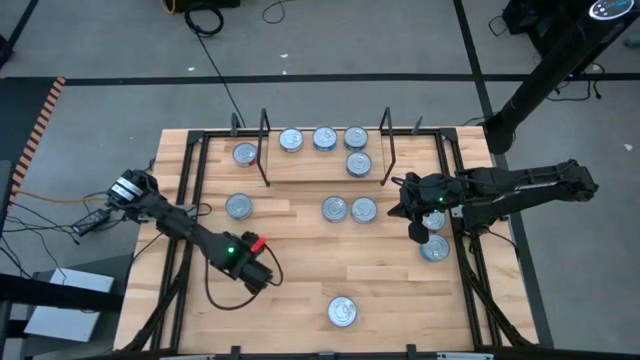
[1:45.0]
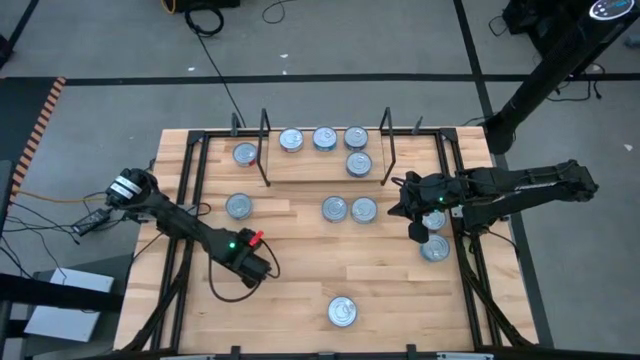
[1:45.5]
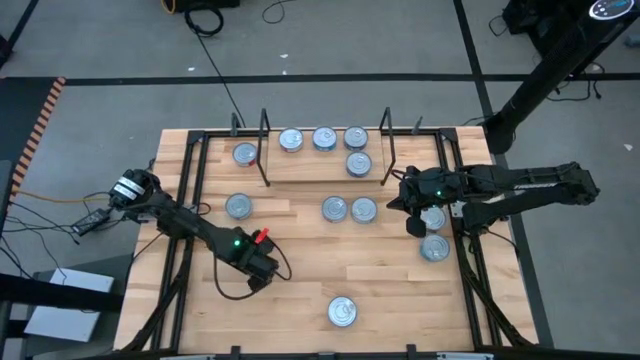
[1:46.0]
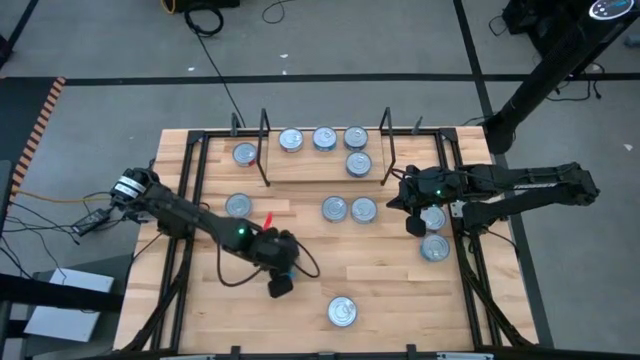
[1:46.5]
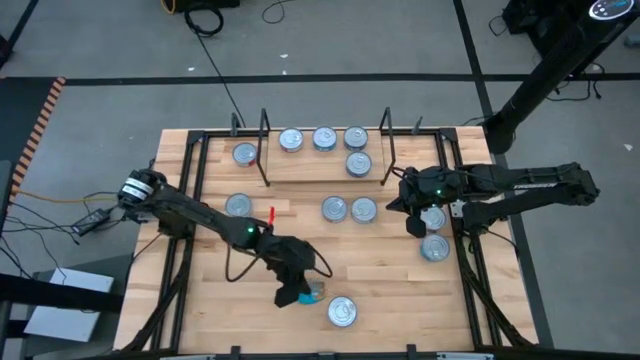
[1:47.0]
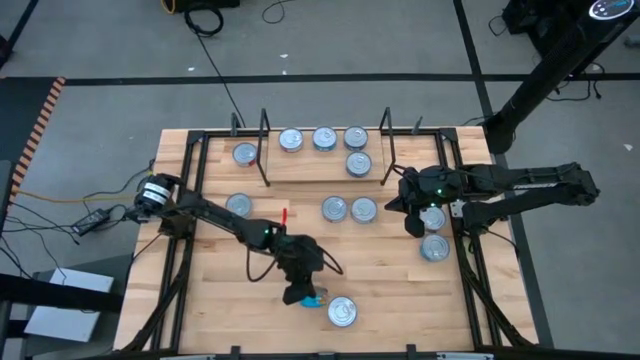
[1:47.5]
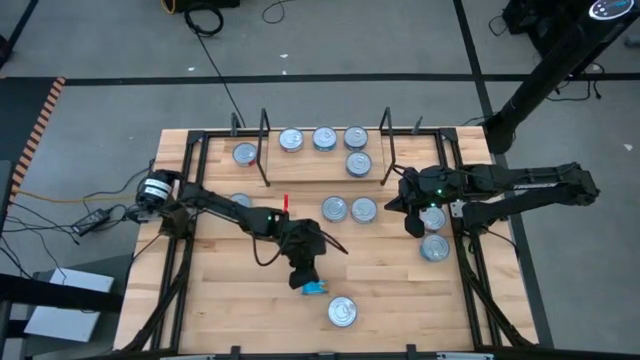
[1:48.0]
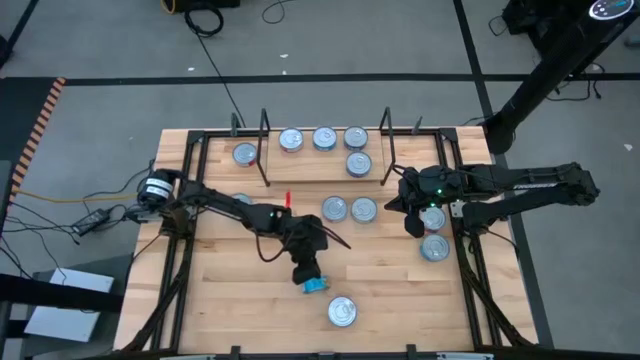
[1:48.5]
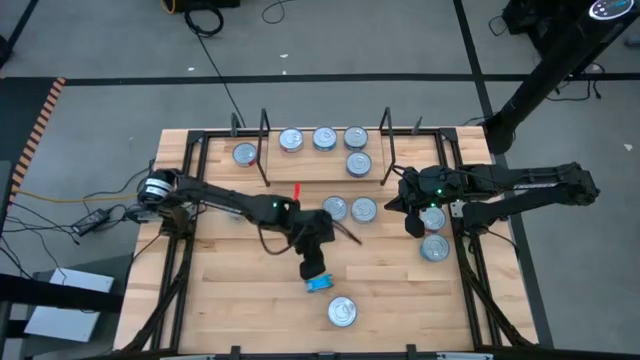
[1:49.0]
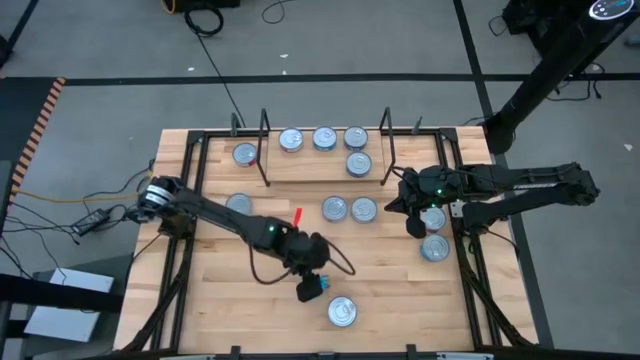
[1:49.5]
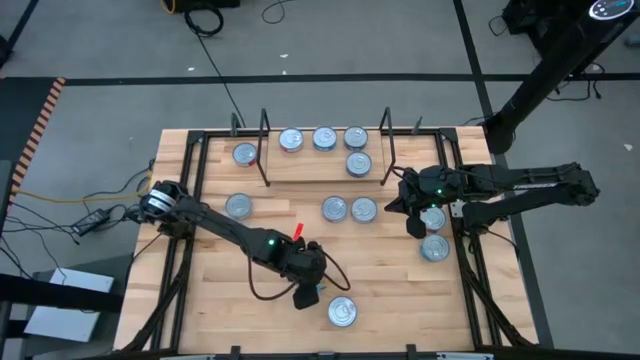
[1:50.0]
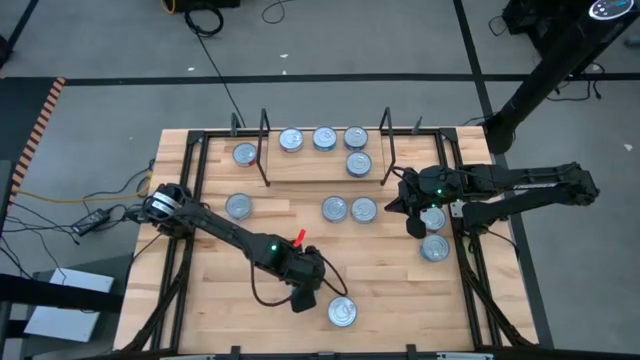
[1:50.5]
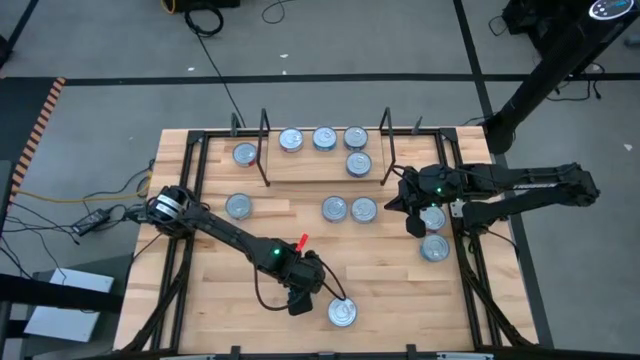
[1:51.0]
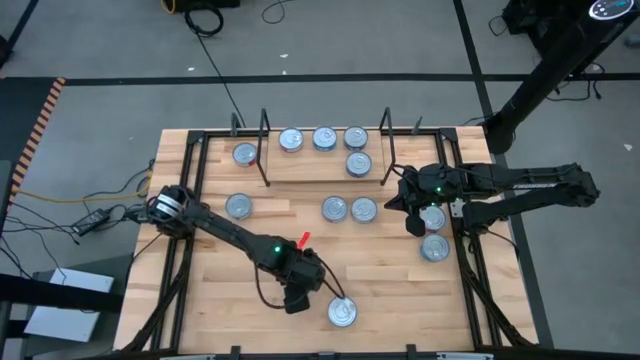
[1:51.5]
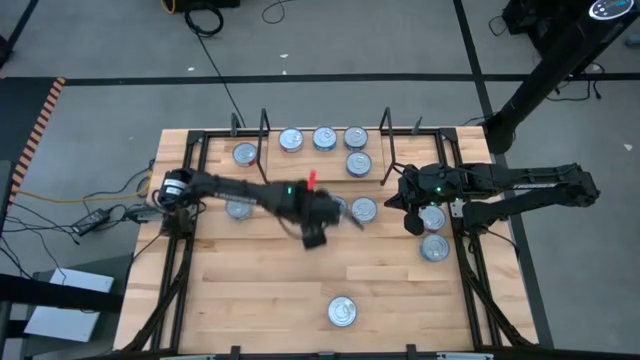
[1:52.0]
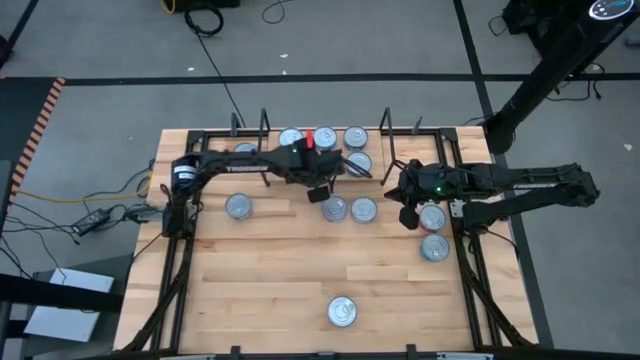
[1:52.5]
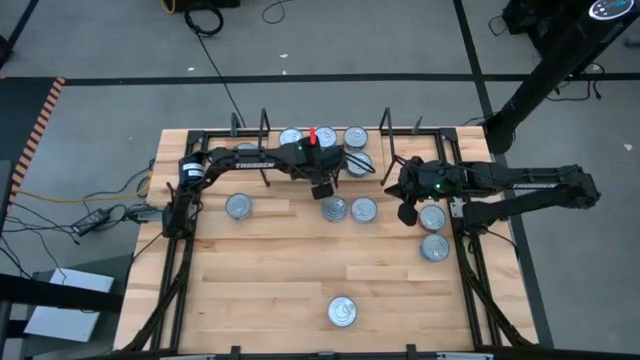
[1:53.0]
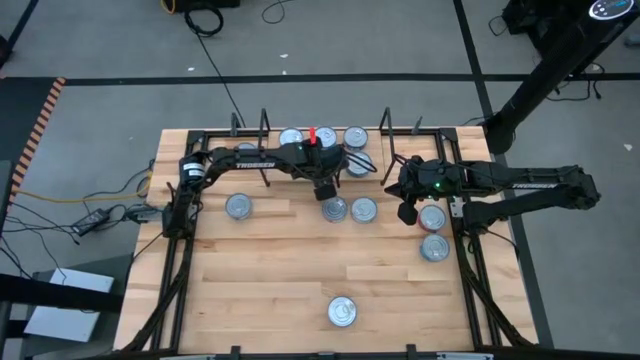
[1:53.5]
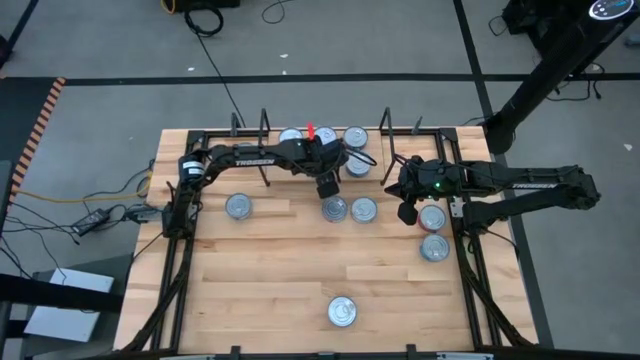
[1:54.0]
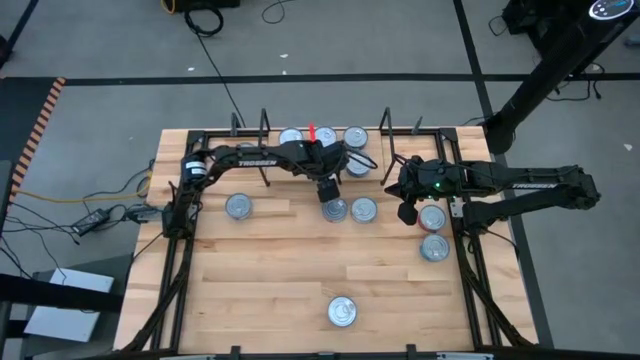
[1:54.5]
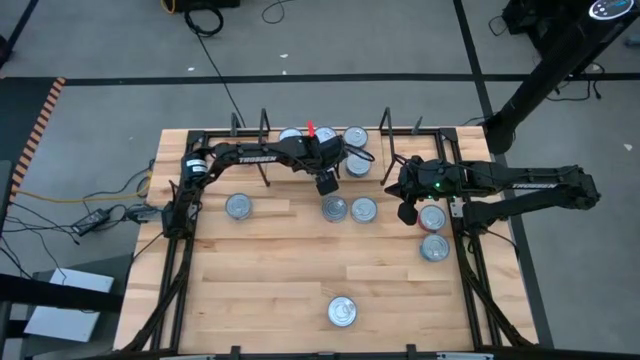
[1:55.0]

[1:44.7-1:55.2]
Task: Stack canned seafood by type on shelf
Put the light blue tuna can on the shelf

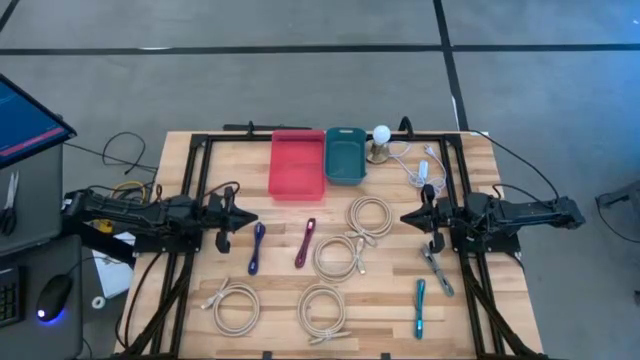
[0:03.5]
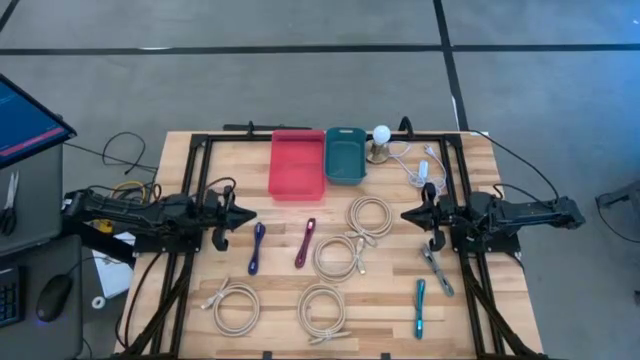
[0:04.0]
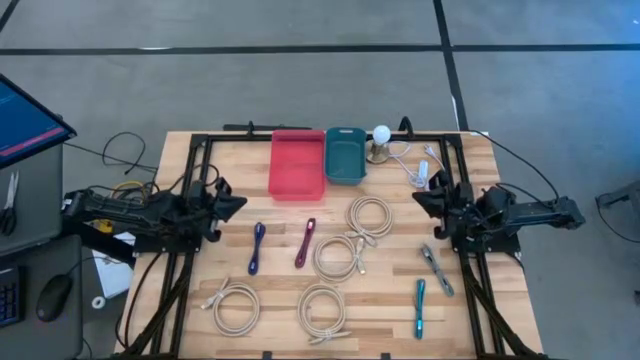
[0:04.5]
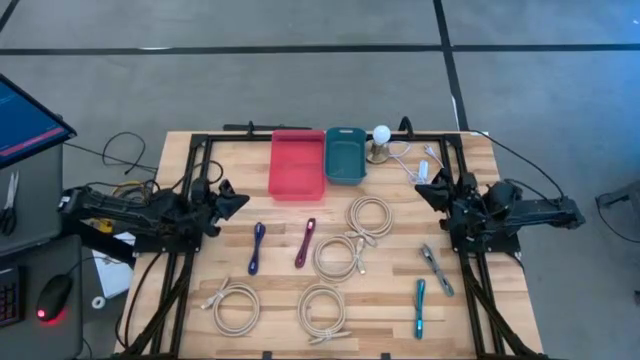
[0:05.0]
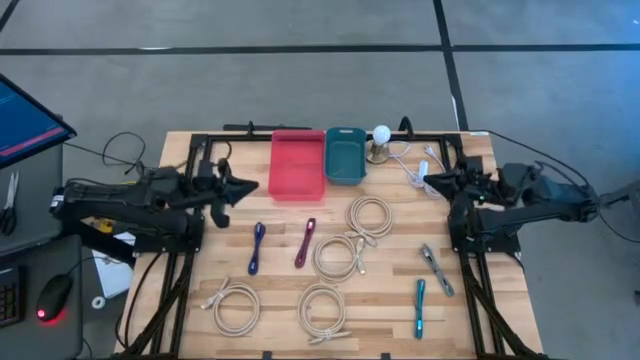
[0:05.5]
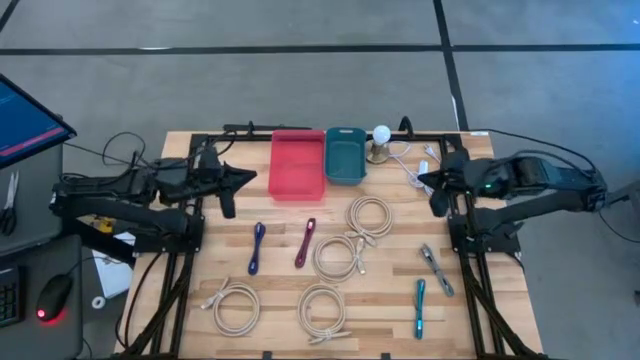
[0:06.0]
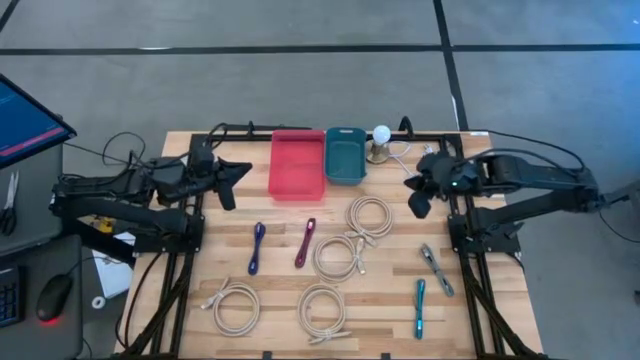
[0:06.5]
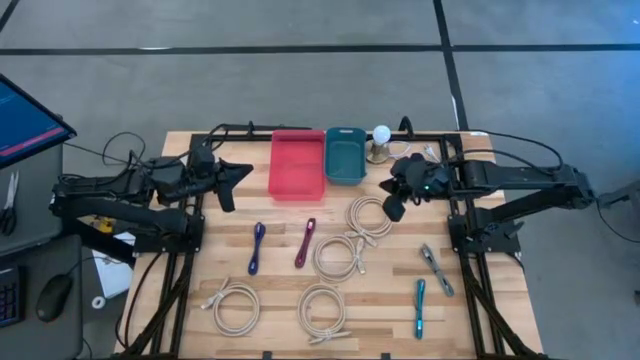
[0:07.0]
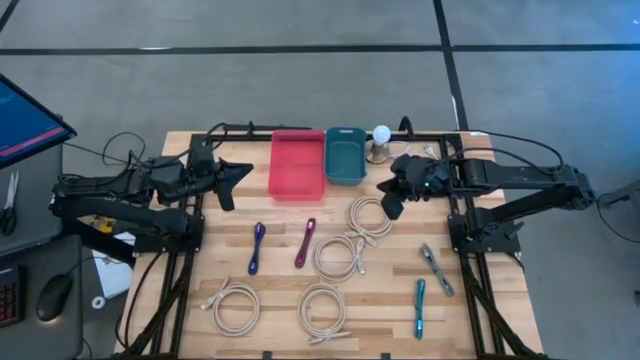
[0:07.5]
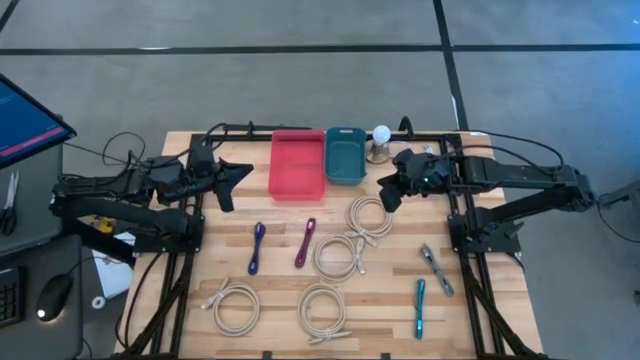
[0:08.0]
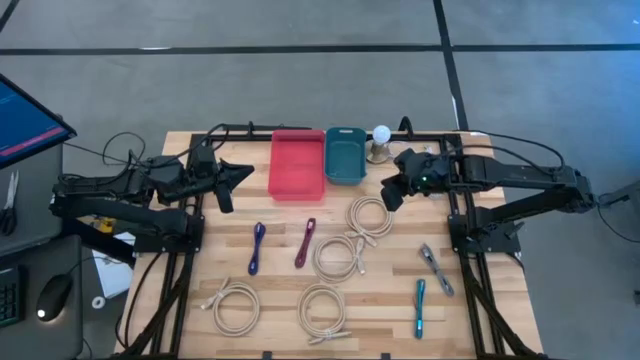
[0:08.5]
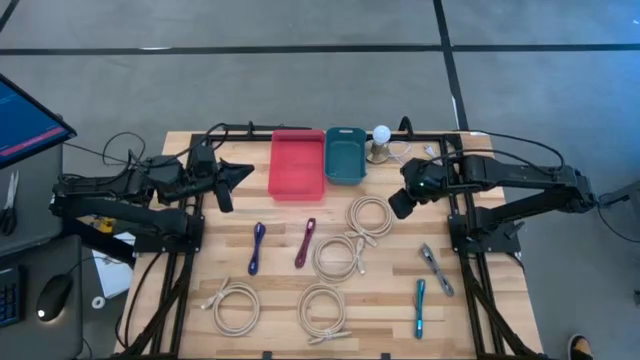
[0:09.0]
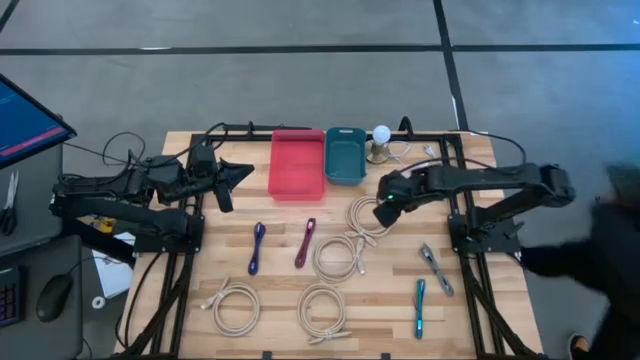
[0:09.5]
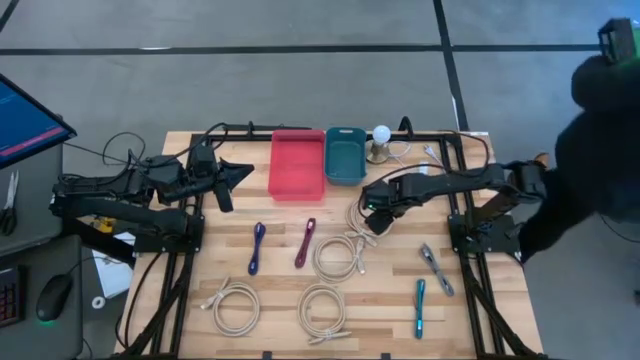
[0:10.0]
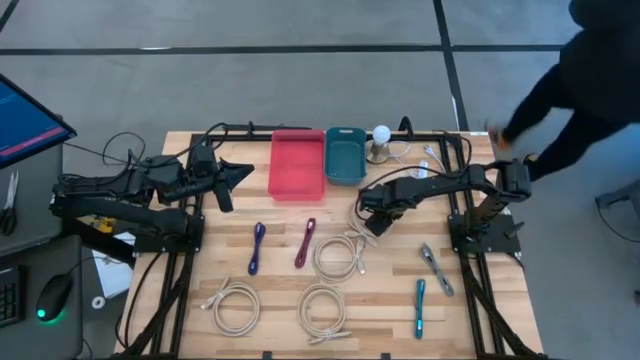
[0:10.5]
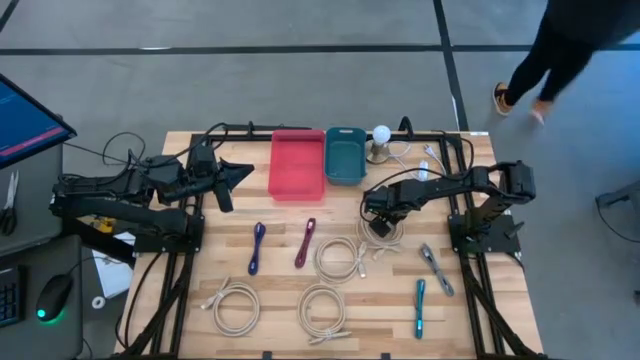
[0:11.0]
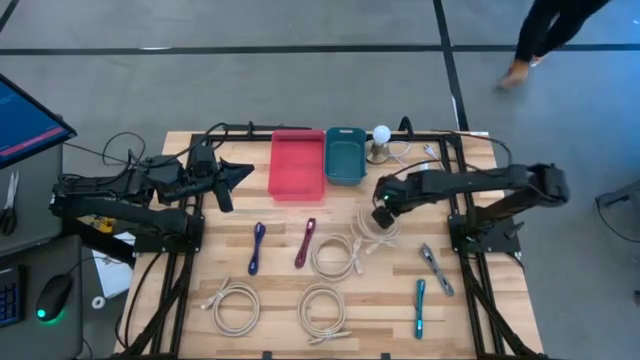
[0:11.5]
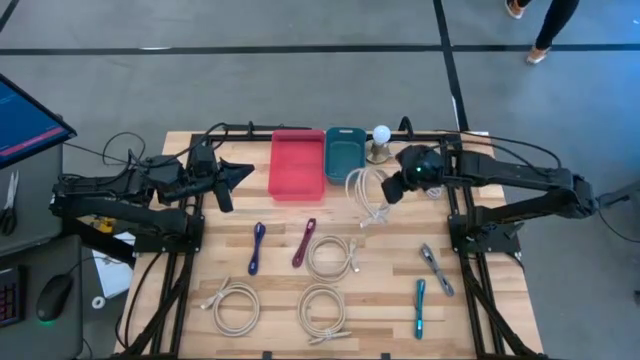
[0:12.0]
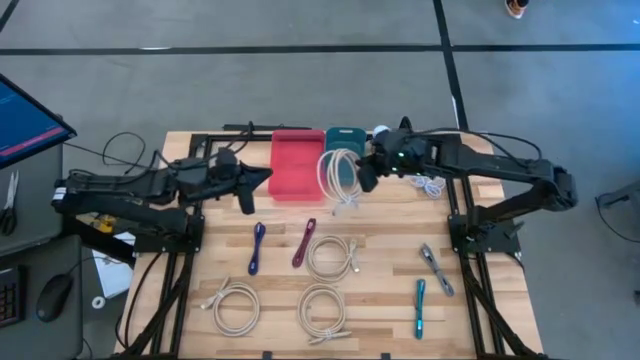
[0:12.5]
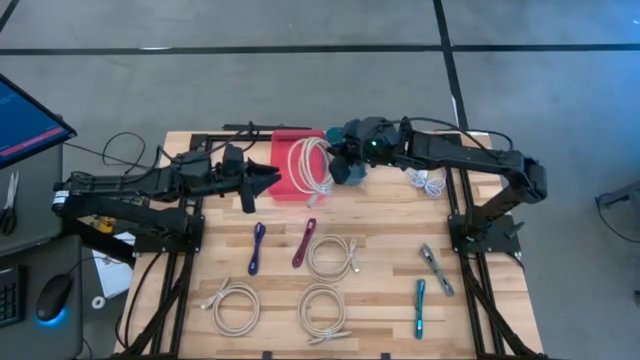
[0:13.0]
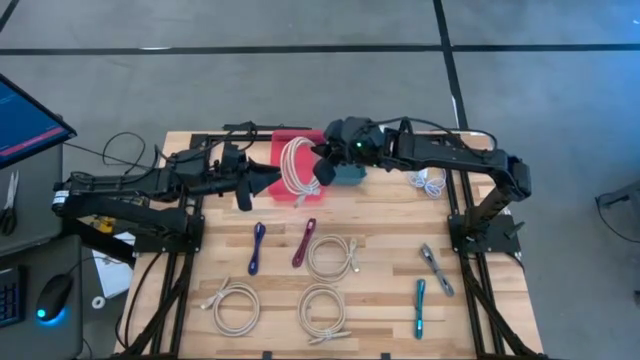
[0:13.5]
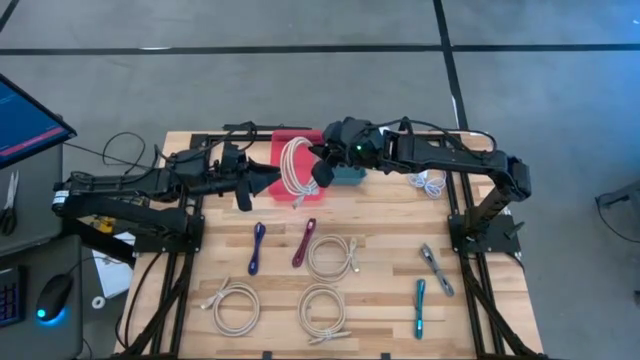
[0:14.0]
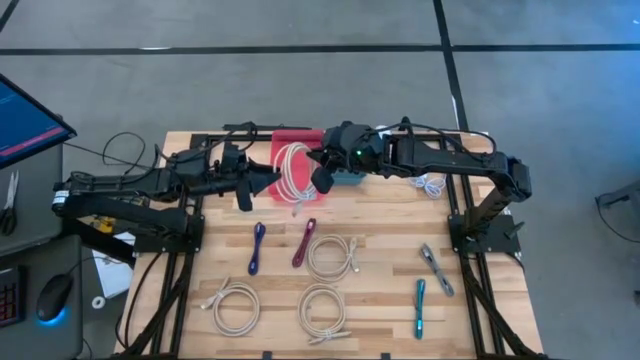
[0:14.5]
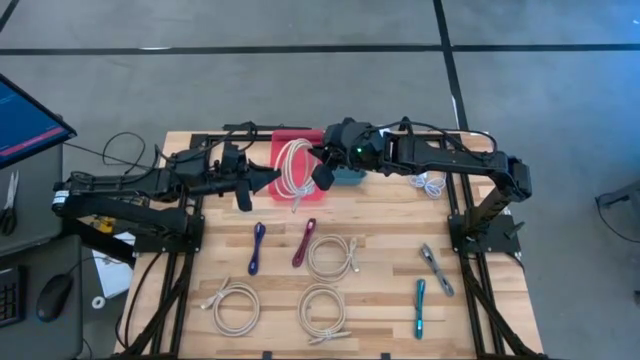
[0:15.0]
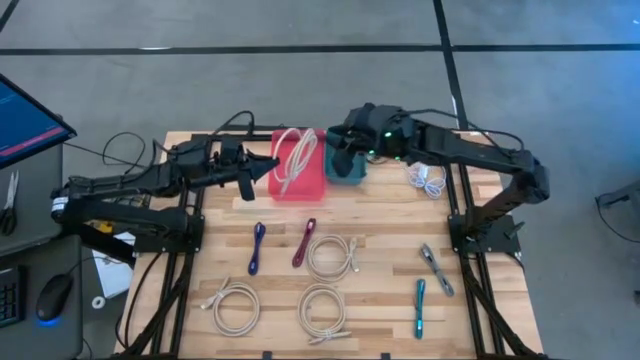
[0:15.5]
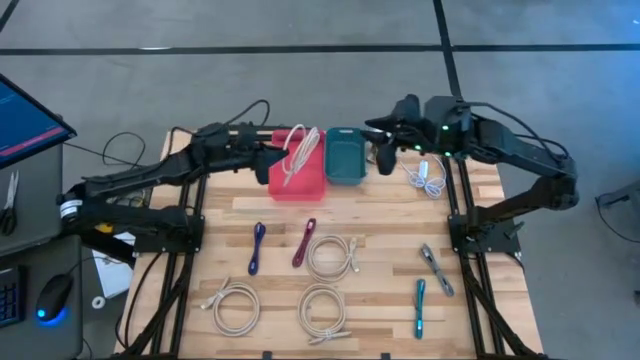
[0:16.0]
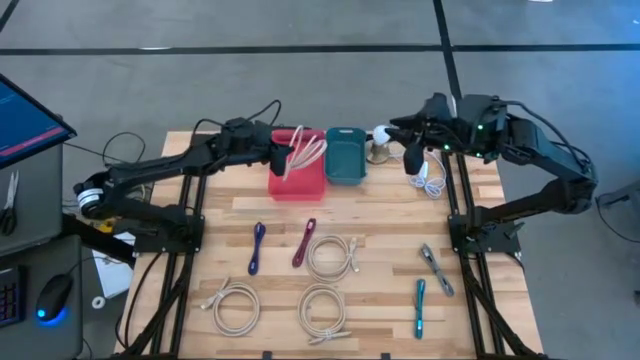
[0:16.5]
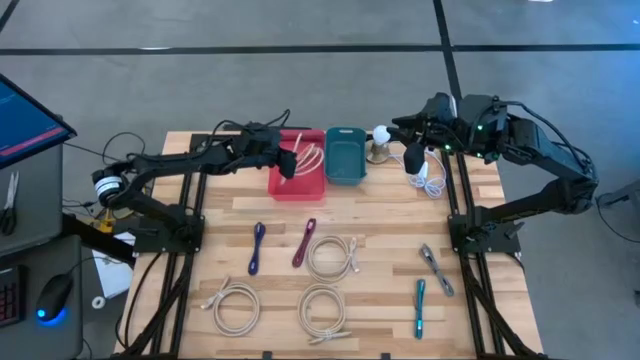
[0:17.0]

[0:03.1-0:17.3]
Task: Pick & Place USB Port
Put the light brown HDMI cable into the pink bin
